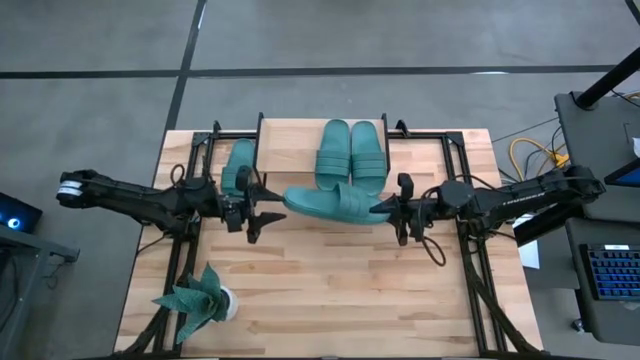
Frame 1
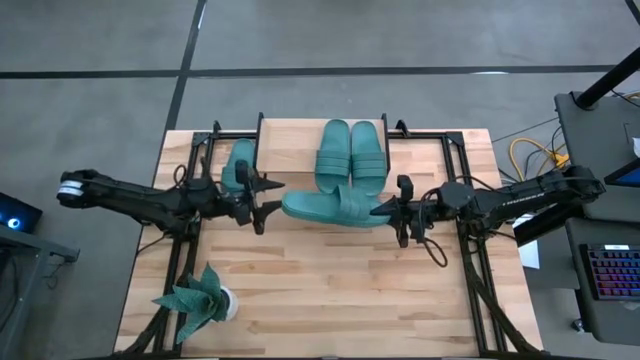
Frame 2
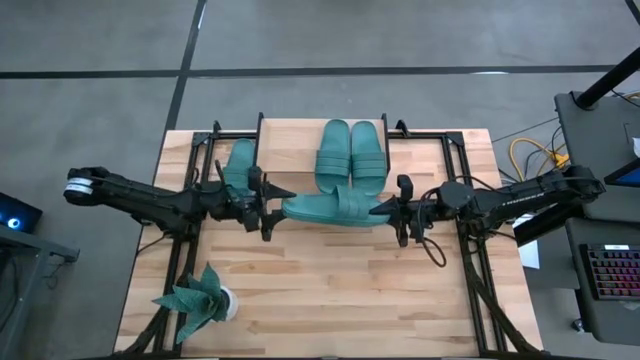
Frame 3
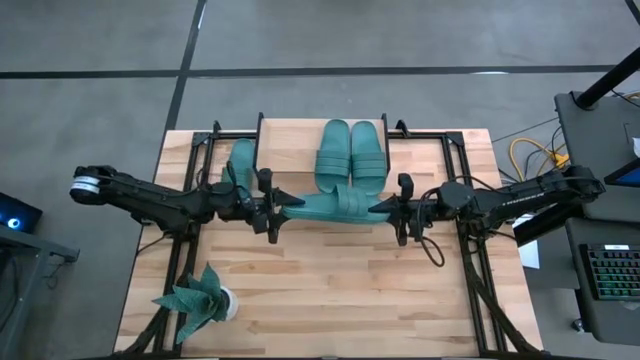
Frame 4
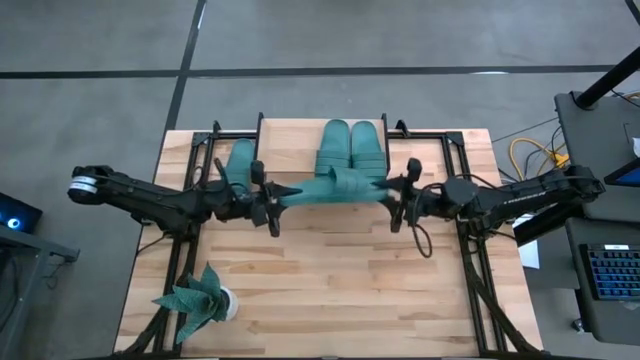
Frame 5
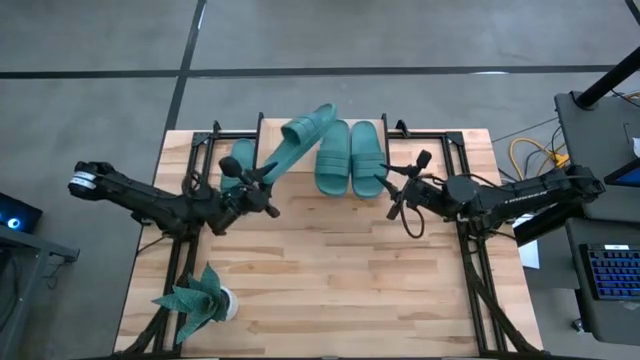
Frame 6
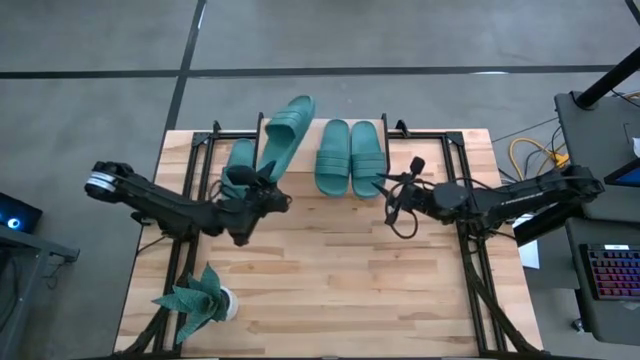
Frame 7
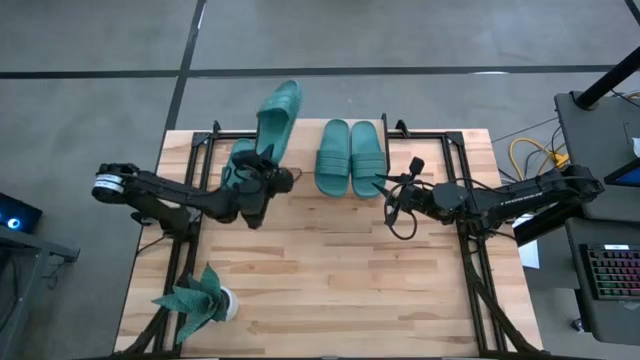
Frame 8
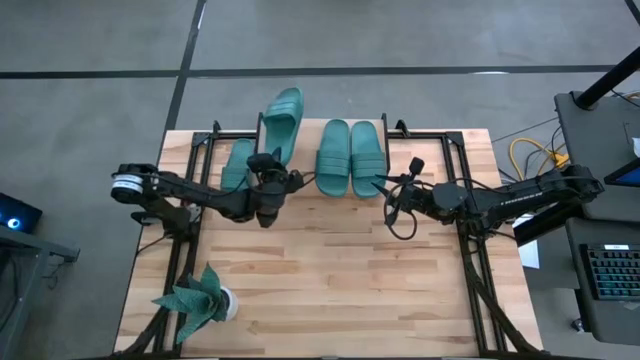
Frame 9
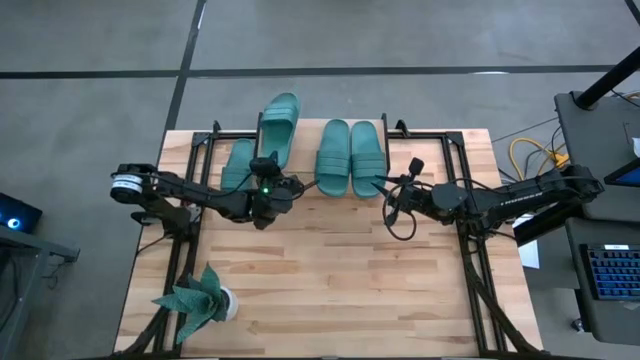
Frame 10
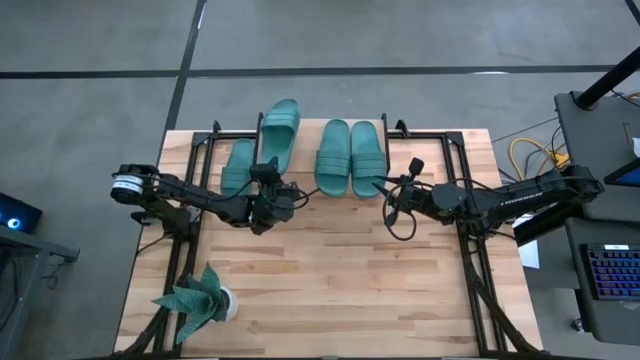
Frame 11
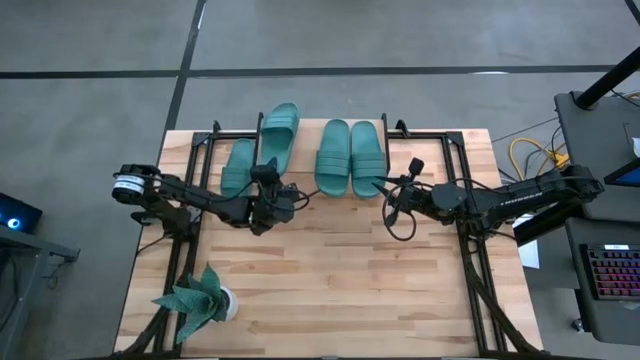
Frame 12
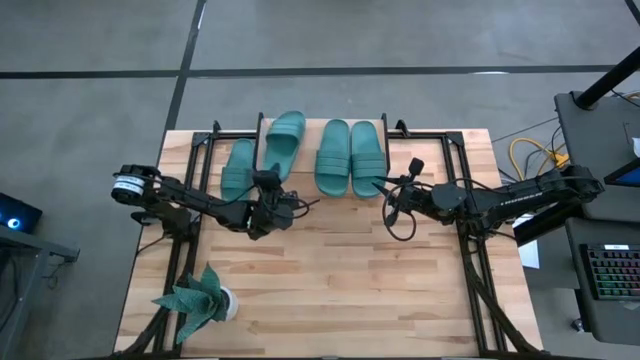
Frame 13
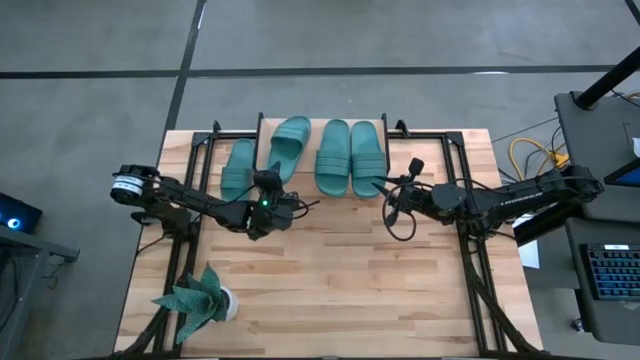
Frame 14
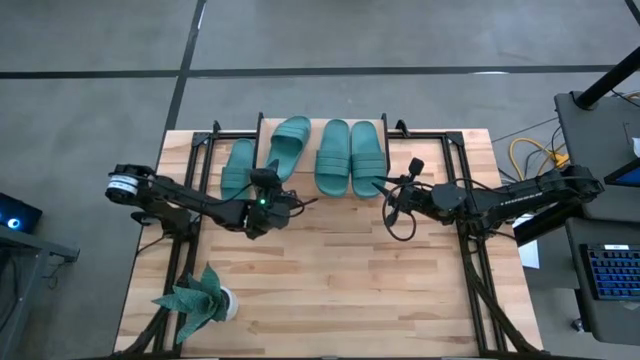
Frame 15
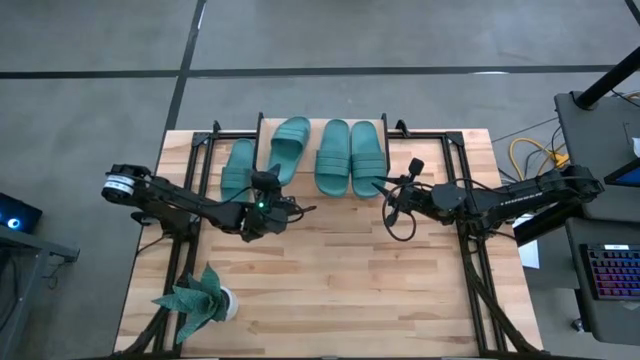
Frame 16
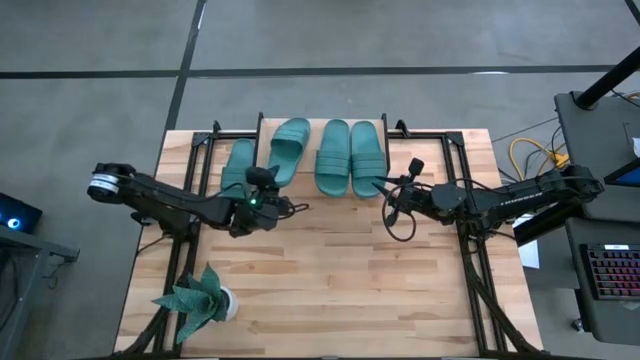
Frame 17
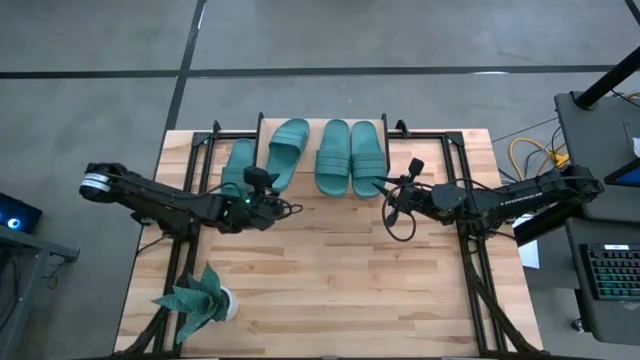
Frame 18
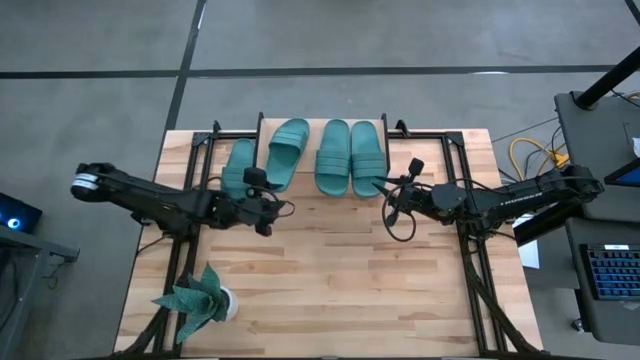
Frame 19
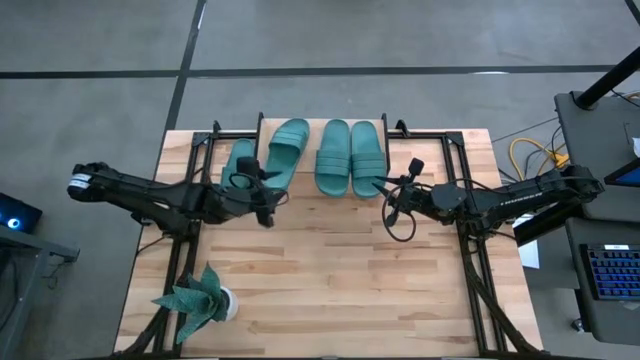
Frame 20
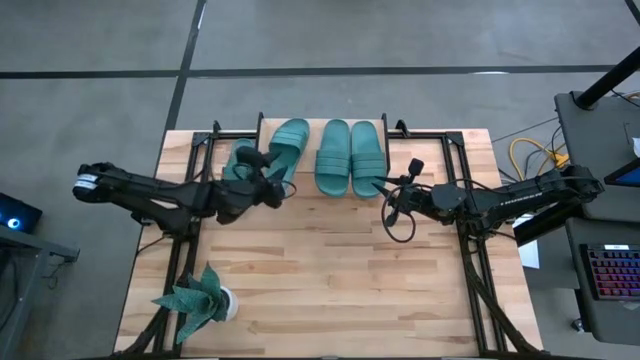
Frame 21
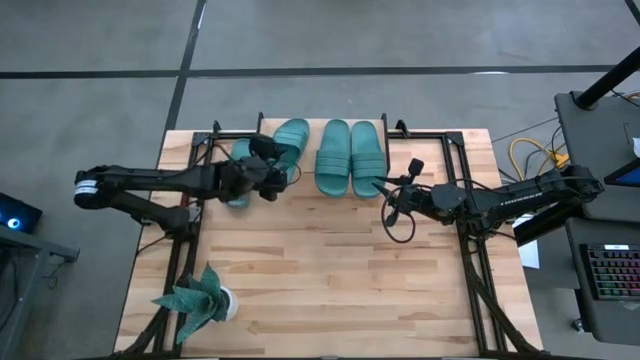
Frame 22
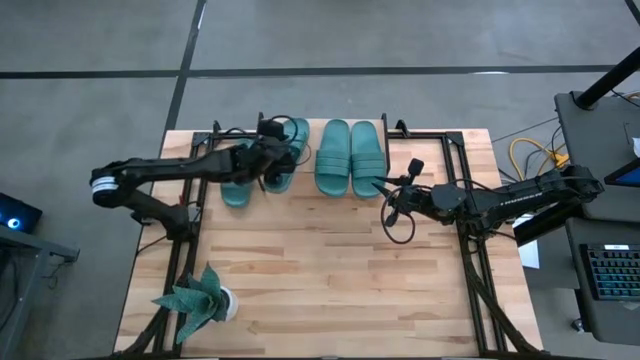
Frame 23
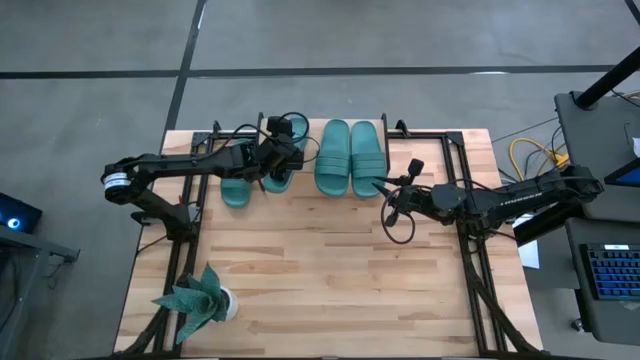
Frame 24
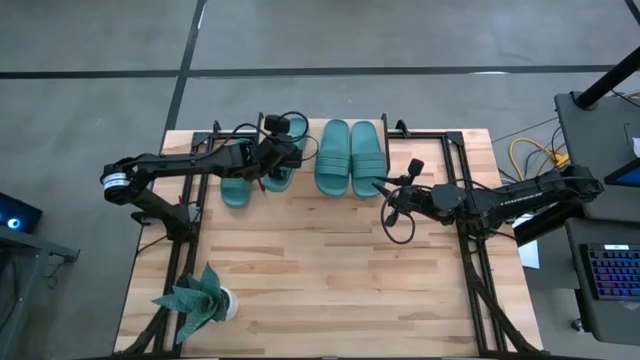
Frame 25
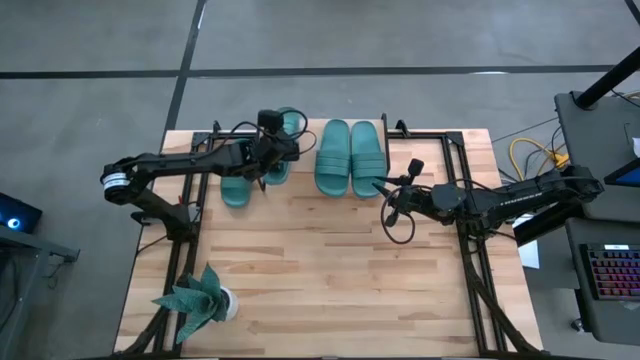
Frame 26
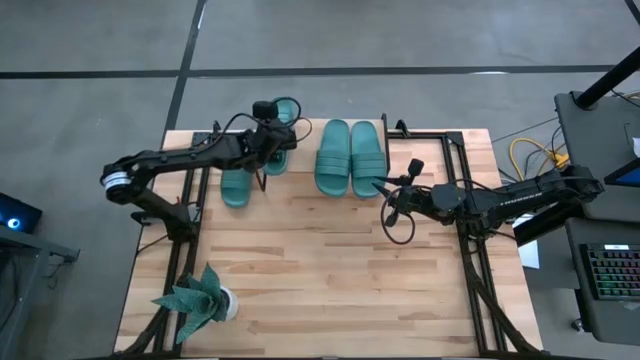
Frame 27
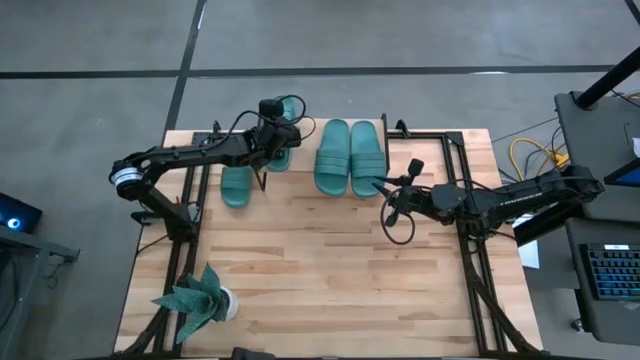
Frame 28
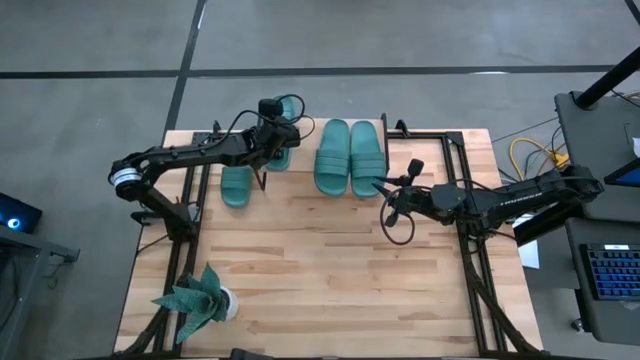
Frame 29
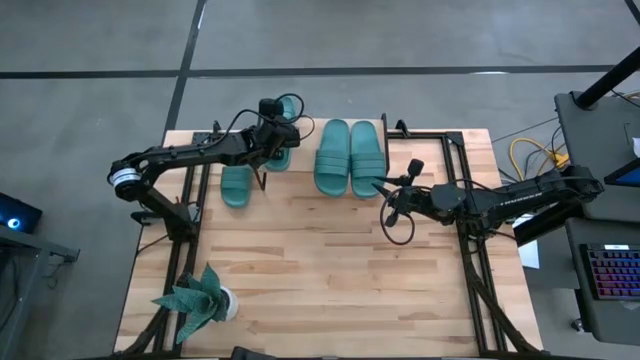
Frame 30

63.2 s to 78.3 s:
Task: Pick and place slides into the shelf
Put the right green slide on the shelf
